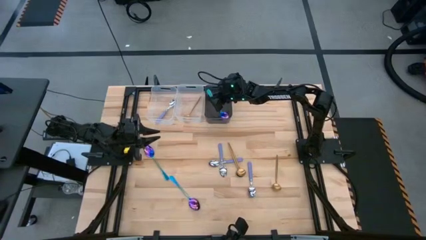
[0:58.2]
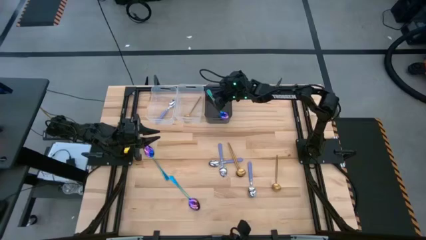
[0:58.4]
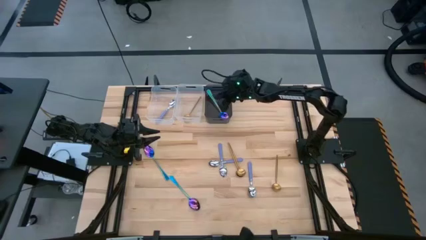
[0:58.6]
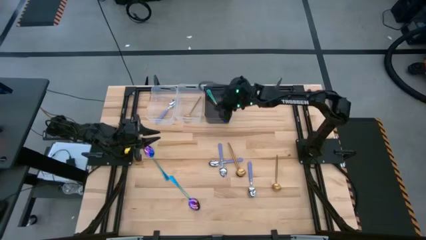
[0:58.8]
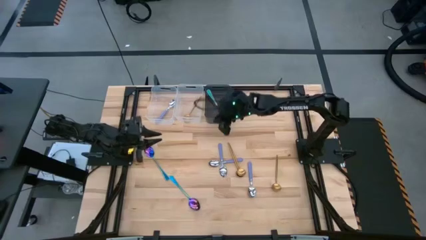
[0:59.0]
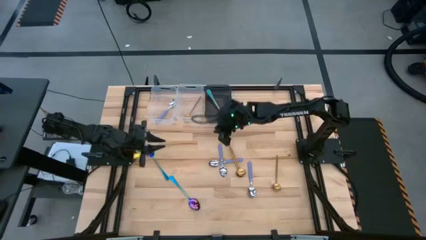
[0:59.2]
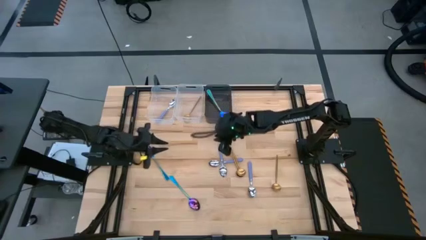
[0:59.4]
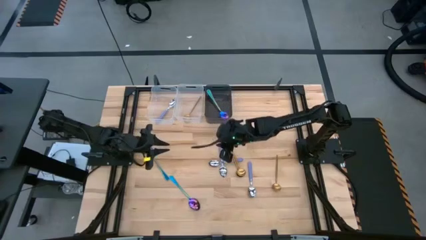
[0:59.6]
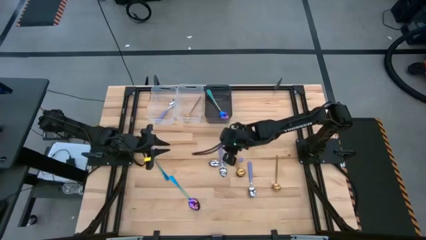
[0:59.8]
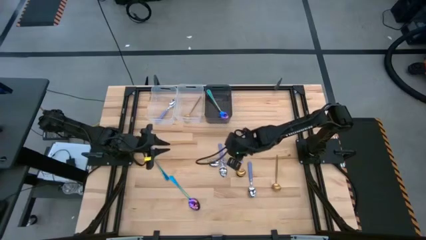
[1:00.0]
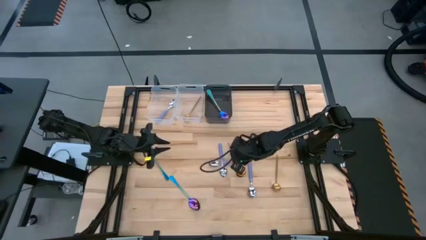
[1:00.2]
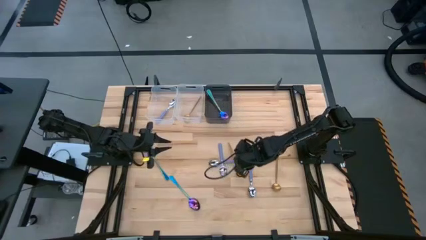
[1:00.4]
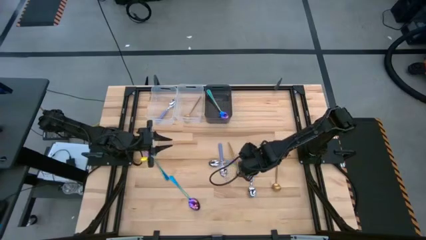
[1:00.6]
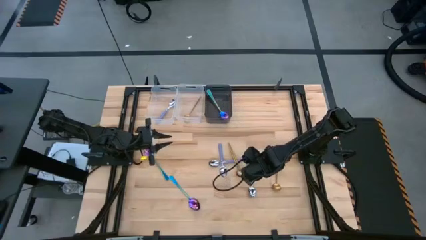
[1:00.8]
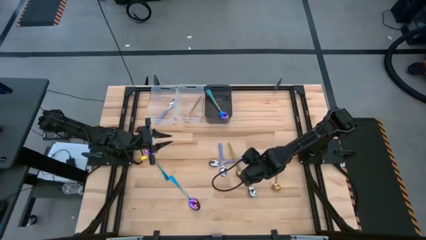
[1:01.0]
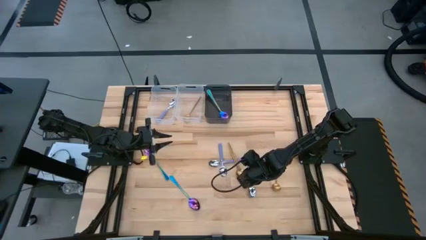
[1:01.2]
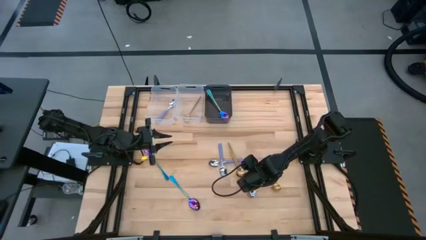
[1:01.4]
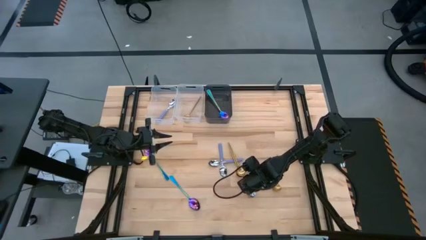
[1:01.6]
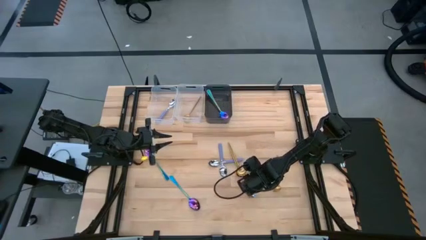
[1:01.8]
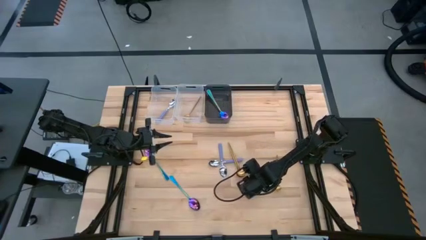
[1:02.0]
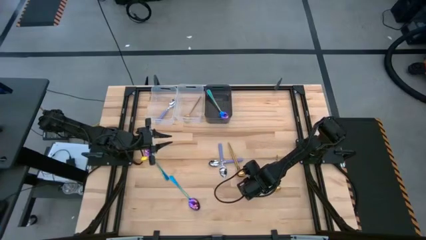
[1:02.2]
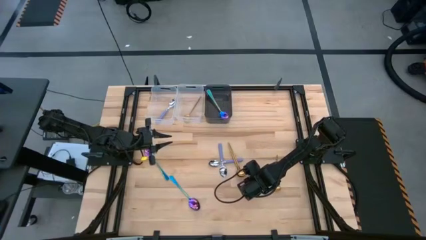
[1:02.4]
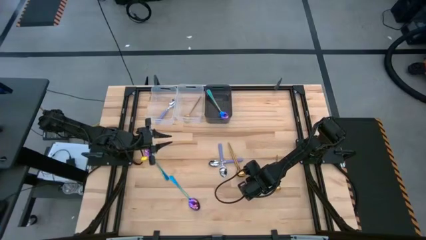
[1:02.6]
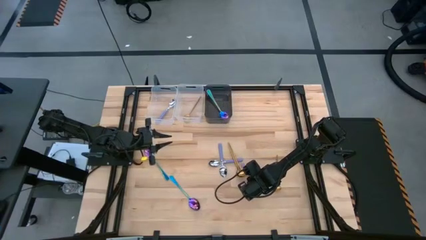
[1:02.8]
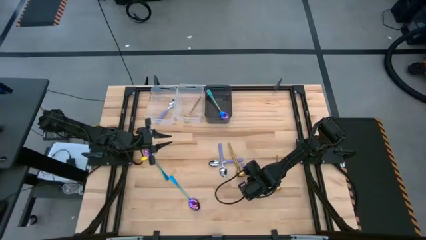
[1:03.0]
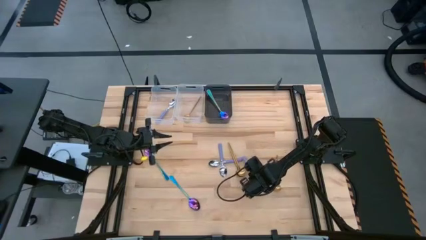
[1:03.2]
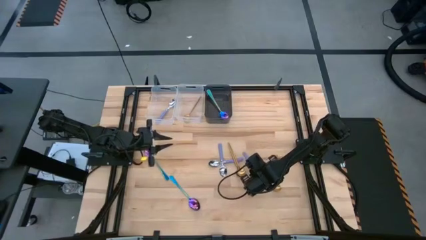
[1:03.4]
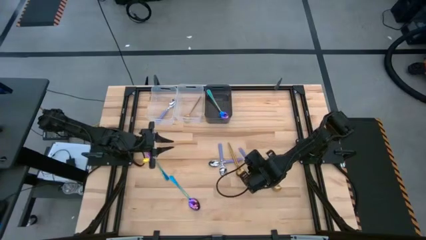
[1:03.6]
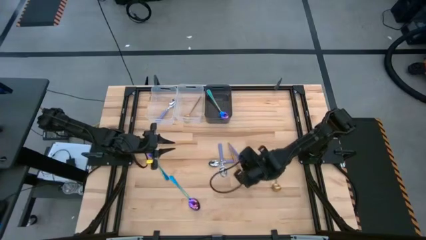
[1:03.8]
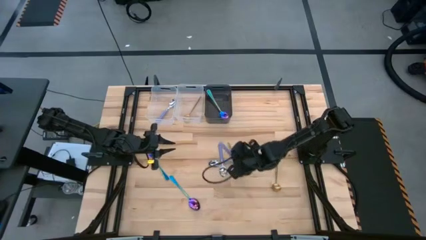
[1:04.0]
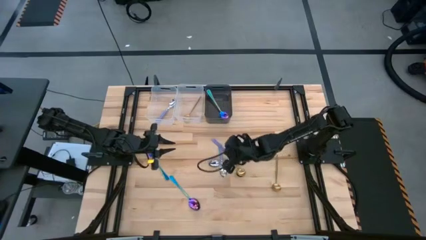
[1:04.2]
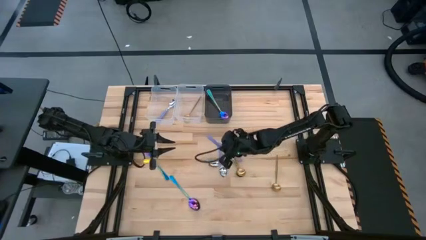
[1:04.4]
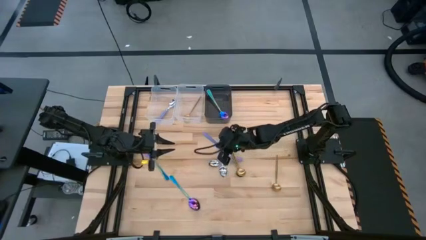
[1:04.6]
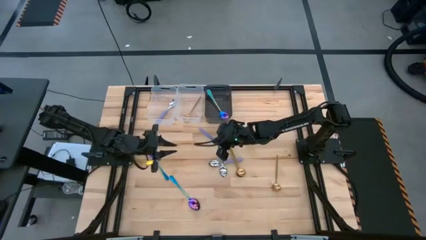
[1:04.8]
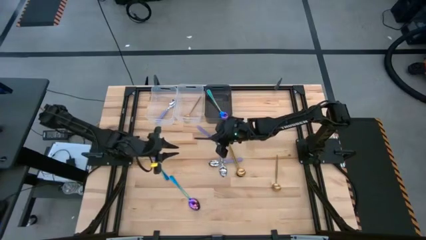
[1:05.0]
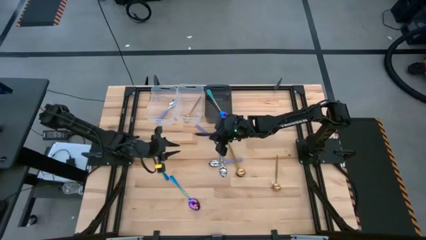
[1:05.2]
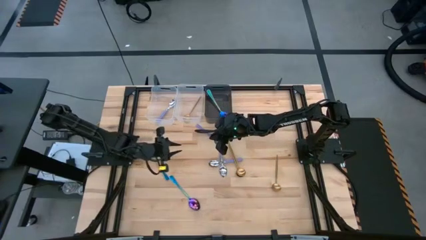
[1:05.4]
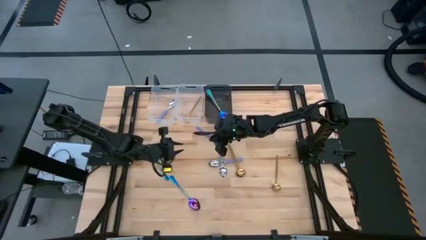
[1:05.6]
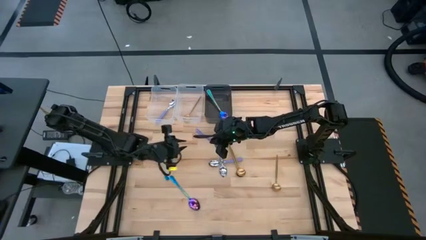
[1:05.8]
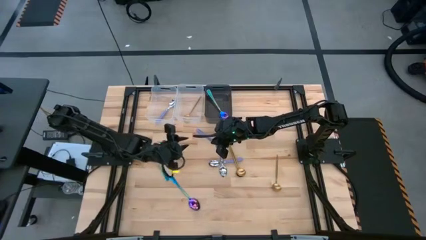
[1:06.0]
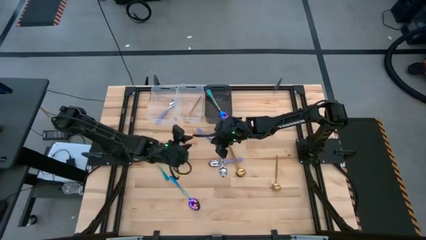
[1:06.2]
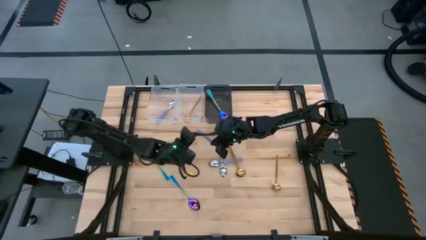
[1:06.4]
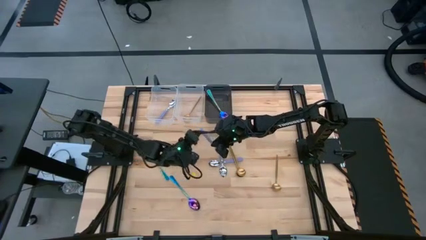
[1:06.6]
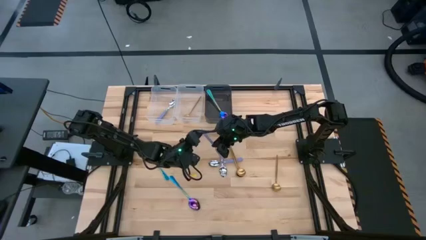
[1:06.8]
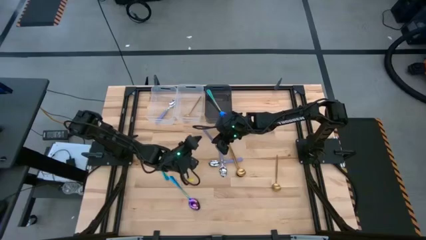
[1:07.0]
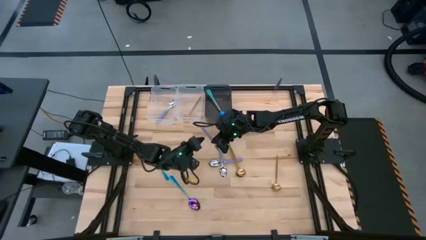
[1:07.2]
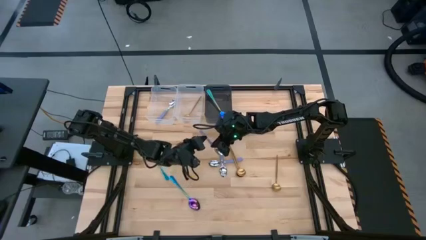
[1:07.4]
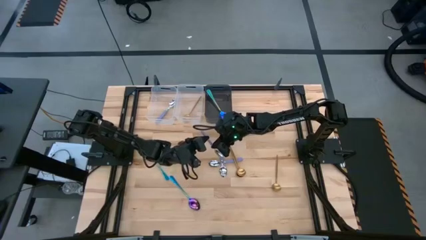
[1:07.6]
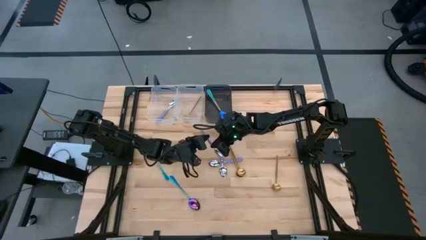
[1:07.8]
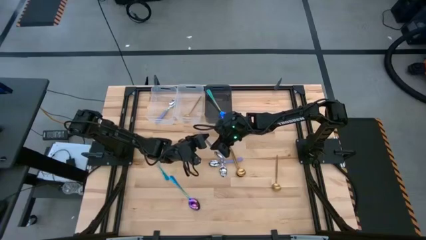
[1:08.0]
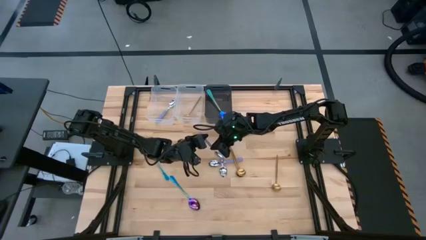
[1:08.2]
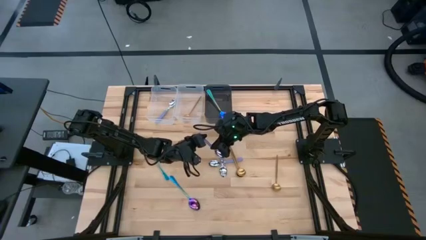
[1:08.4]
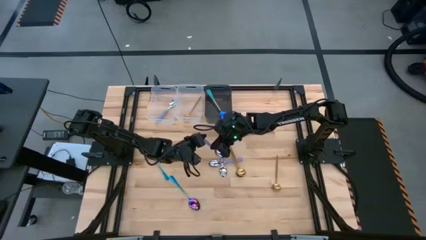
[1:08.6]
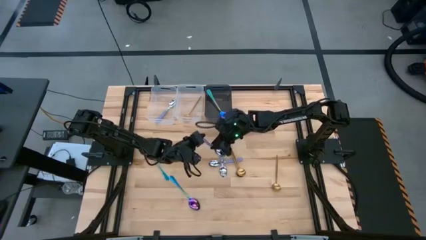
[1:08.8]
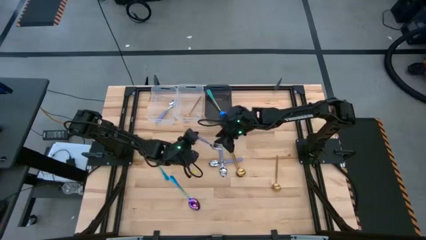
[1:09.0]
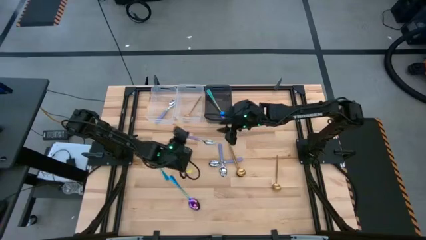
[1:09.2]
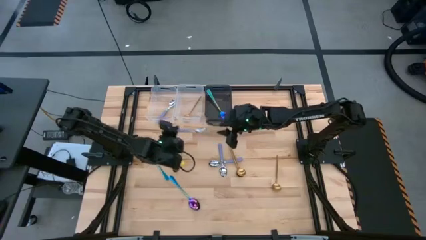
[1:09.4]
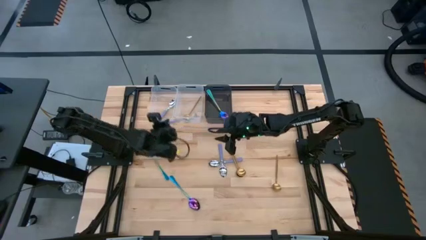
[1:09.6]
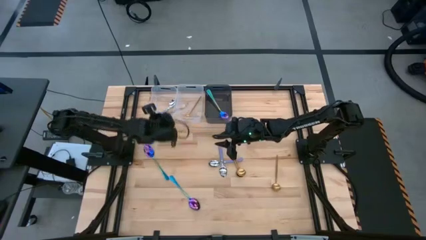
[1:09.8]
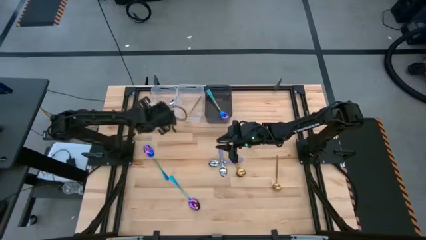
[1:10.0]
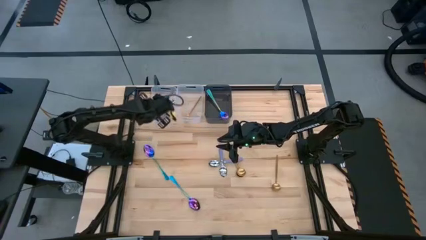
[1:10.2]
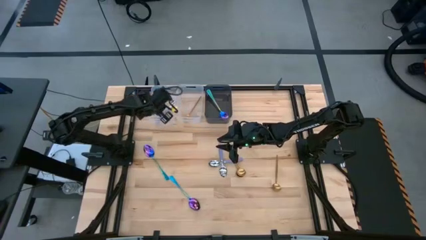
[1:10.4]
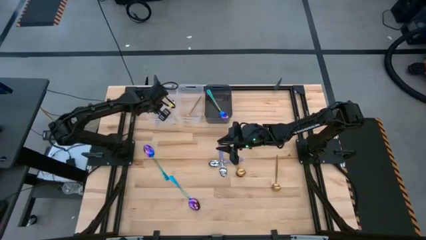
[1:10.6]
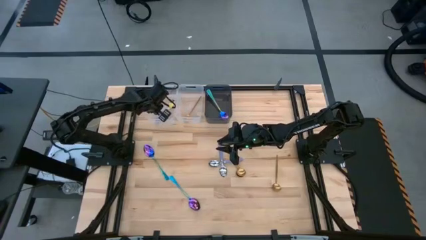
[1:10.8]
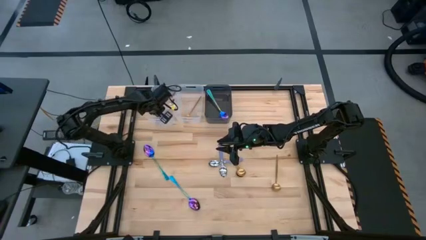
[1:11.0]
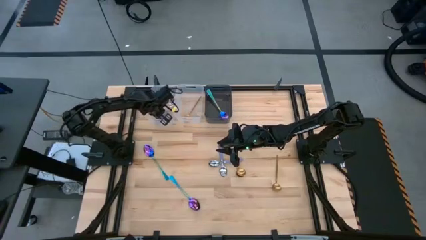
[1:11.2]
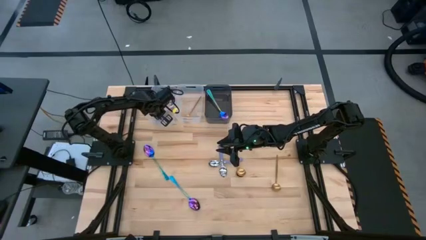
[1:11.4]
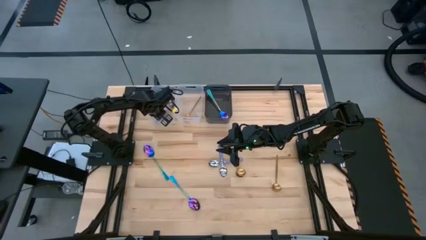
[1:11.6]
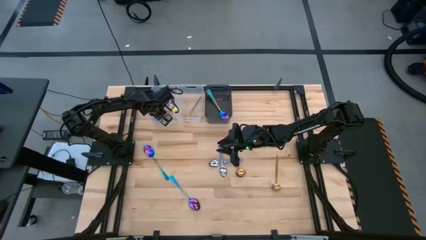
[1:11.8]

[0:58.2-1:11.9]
Task: Sort silverware by color (type)
Put the violet spoon into the left transparent bin

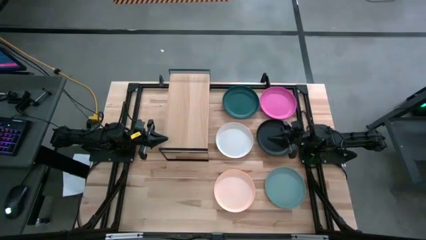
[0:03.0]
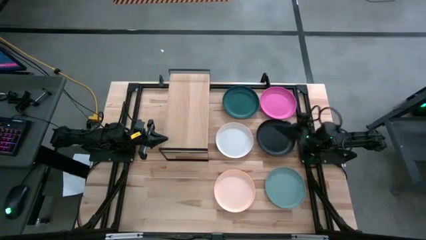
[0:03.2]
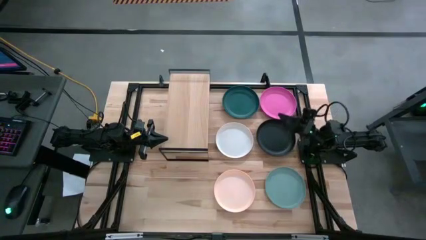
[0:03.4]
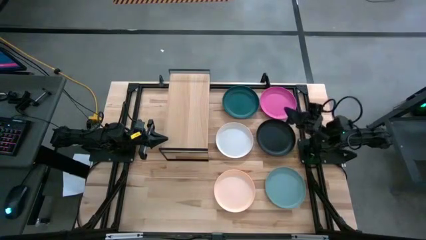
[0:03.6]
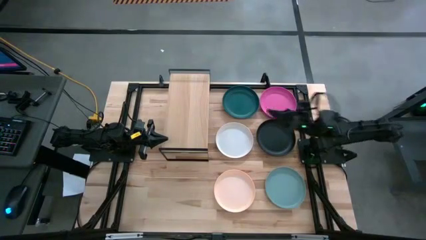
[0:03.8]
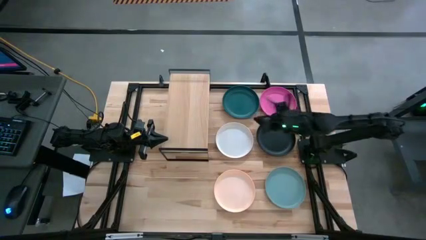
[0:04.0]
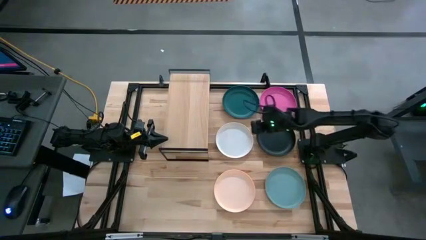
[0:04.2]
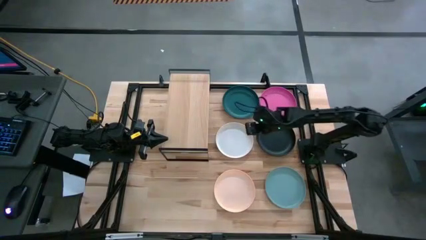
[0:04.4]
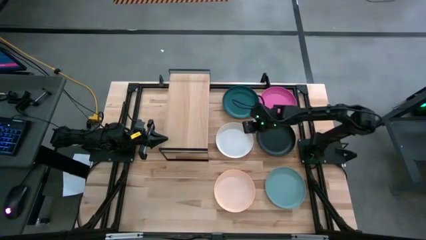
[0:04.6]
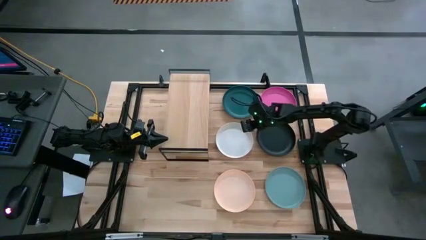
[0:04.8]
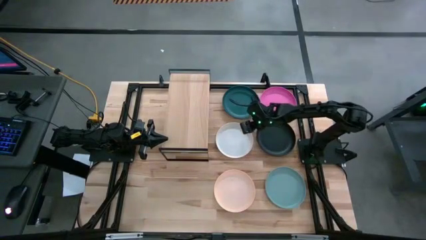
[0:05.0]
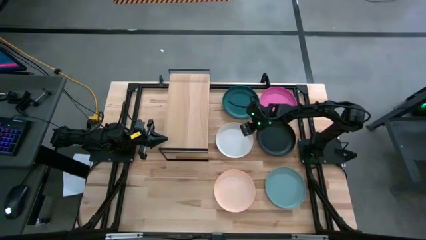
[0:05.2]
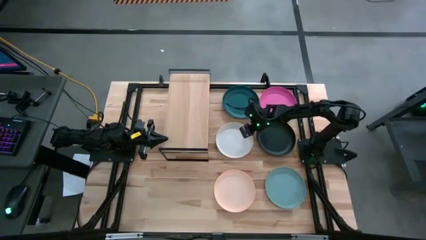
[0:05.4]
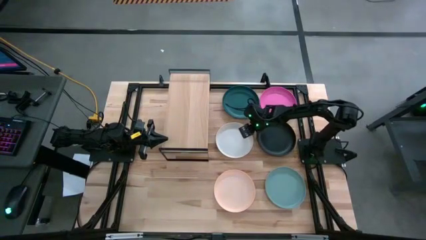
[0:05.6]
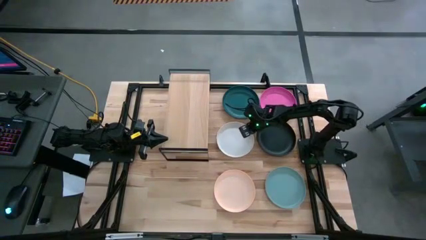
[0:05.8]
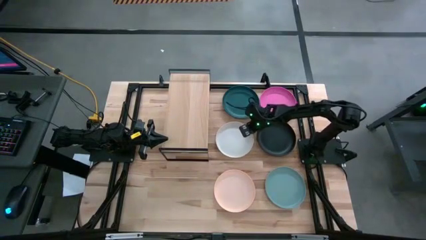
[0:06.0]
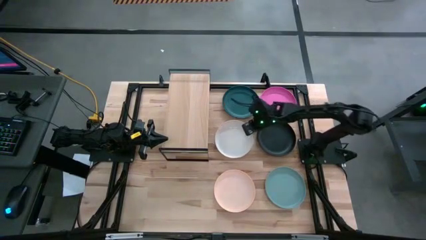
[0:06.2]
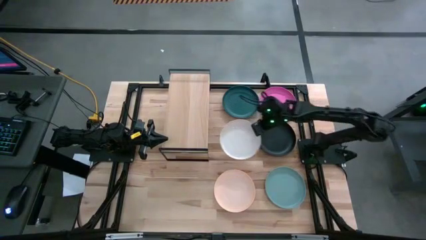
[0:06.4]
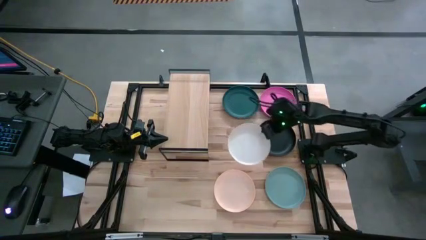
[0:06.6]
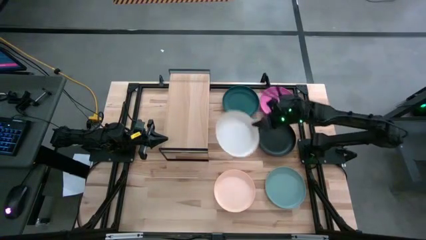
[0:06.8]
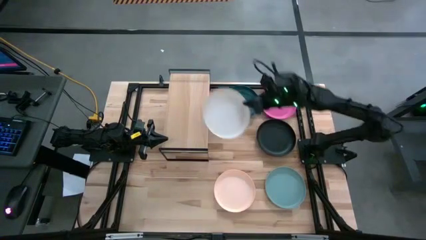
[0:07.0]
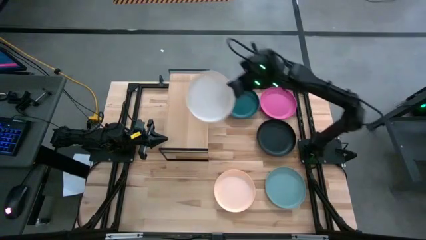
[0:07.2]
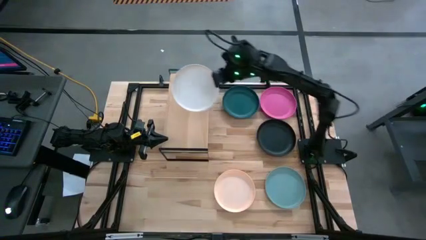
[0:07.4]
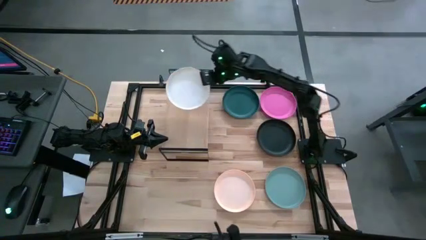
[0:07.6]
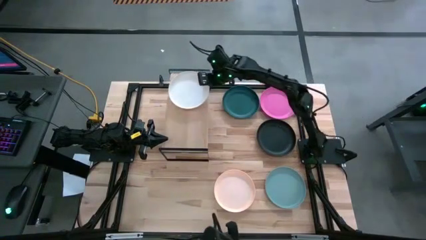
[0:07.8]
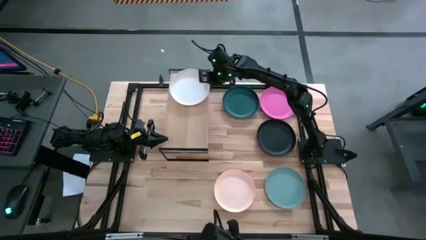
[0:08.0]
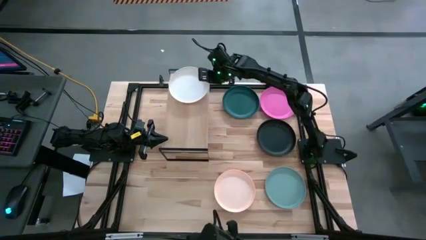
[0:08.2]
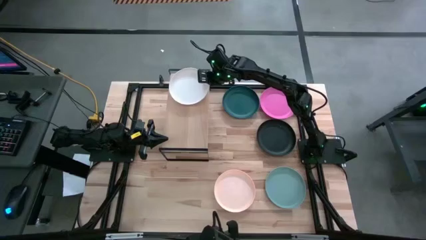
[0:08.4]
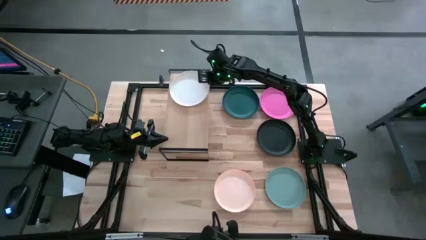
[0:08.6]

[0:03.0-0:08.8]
Task: Place and stack plates onto a shelf
Put the white plate on the shelf
